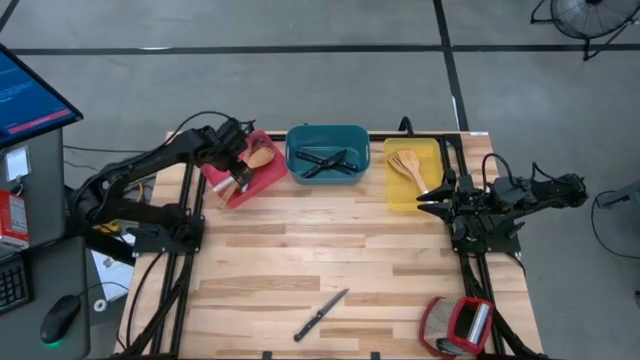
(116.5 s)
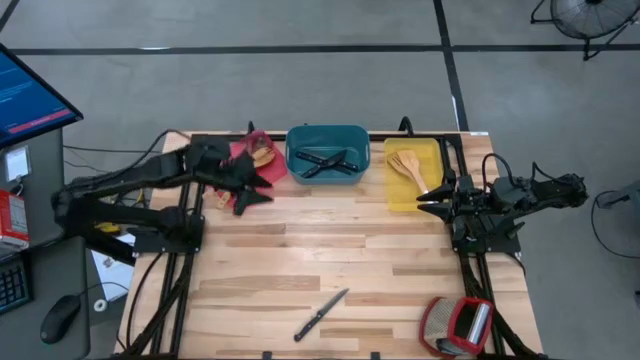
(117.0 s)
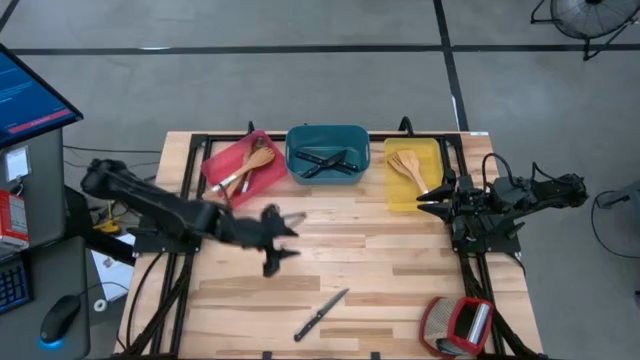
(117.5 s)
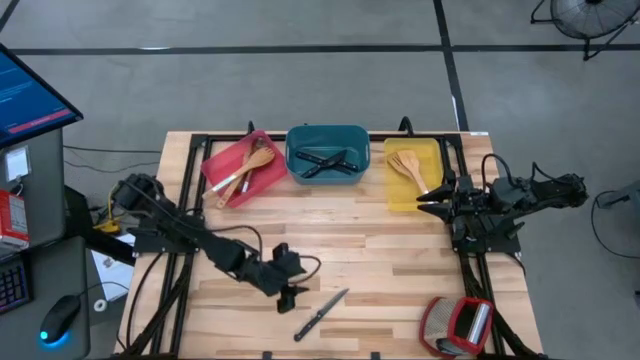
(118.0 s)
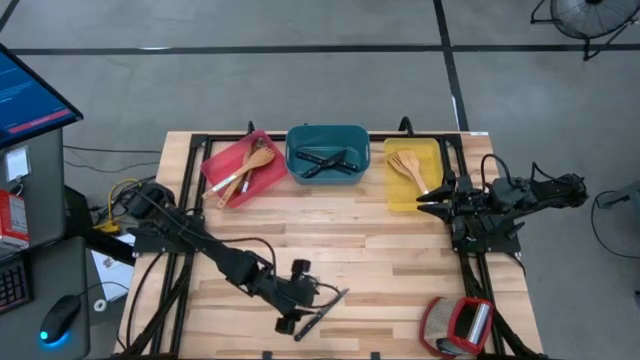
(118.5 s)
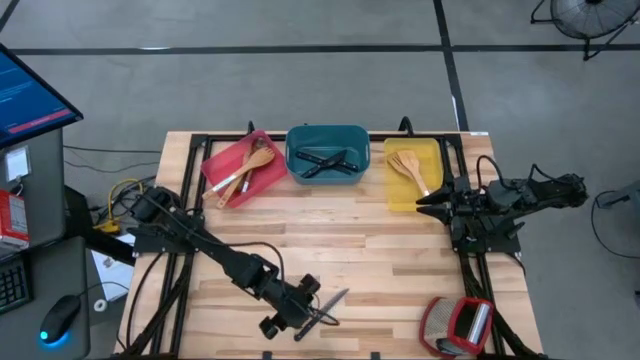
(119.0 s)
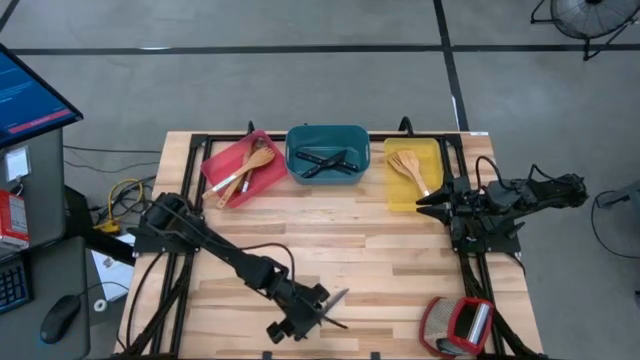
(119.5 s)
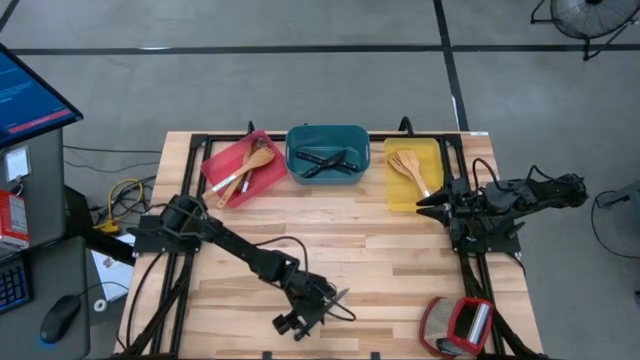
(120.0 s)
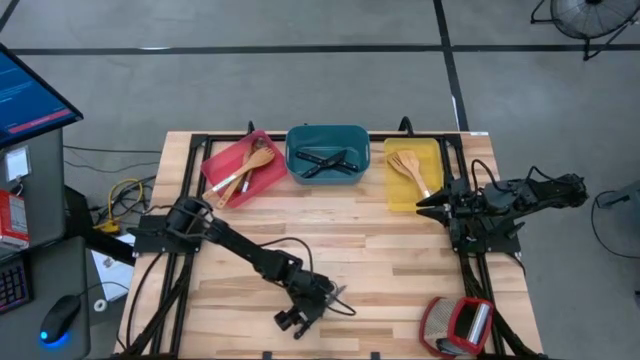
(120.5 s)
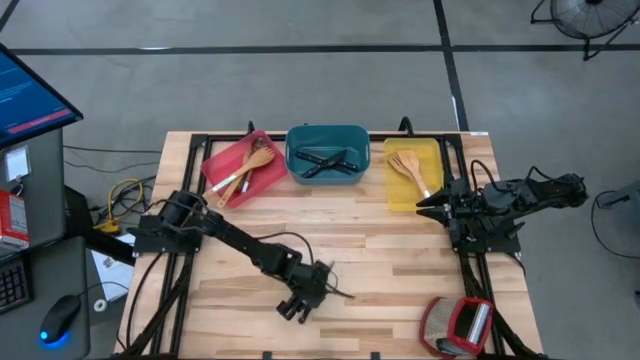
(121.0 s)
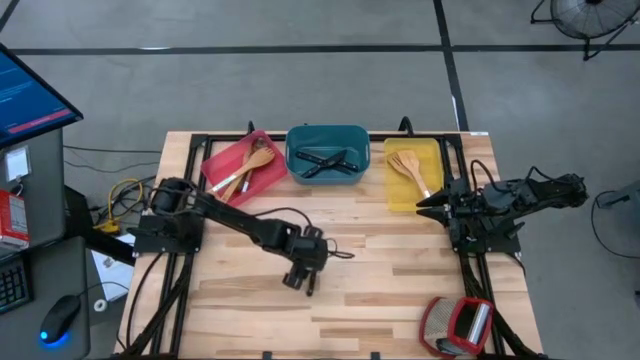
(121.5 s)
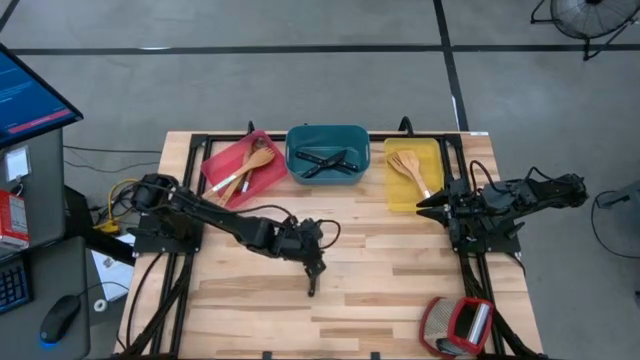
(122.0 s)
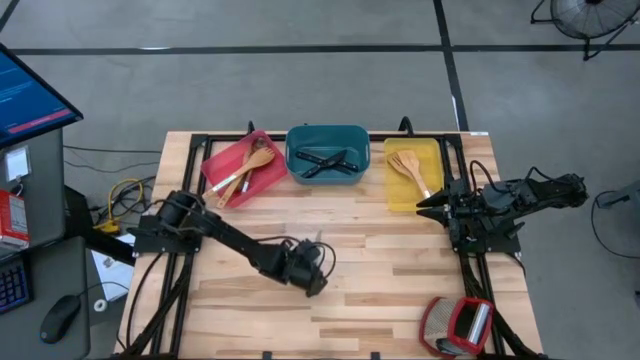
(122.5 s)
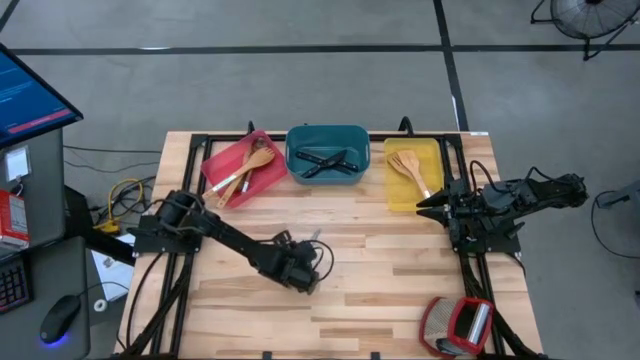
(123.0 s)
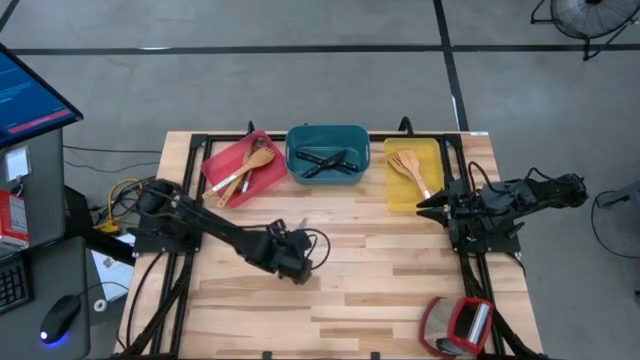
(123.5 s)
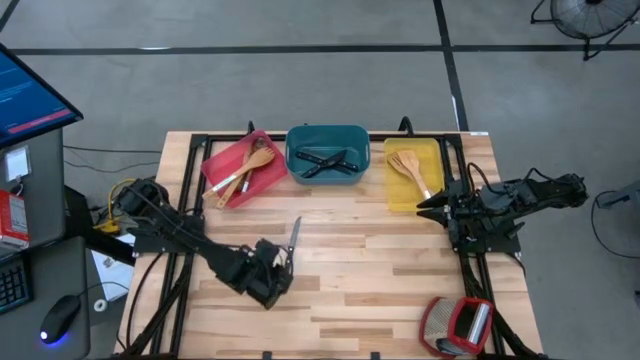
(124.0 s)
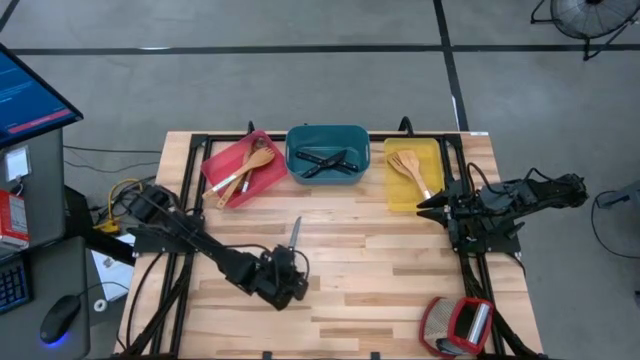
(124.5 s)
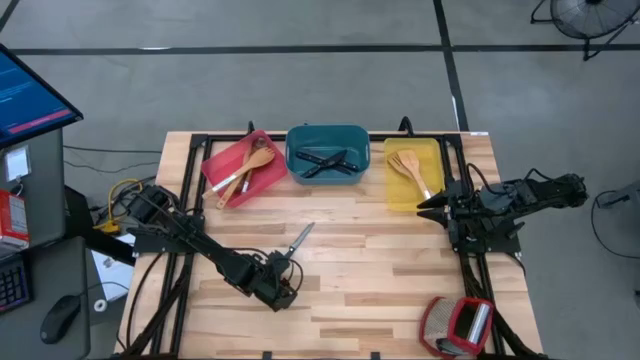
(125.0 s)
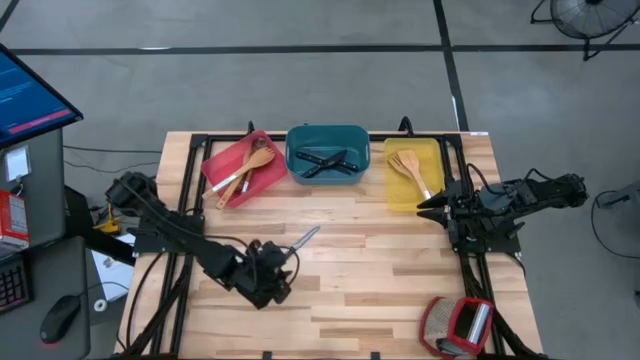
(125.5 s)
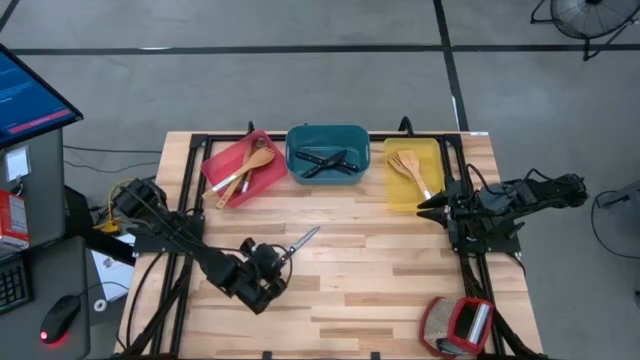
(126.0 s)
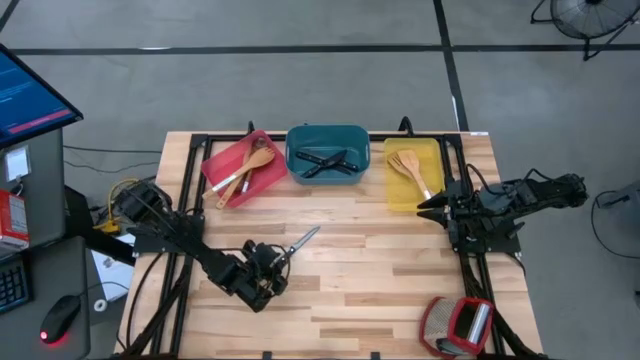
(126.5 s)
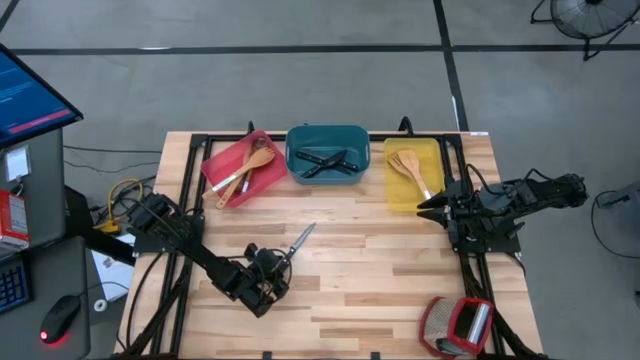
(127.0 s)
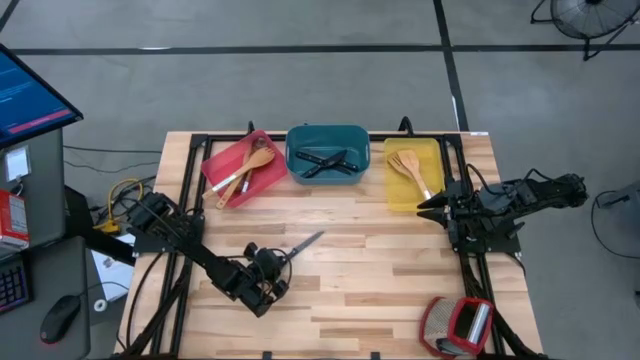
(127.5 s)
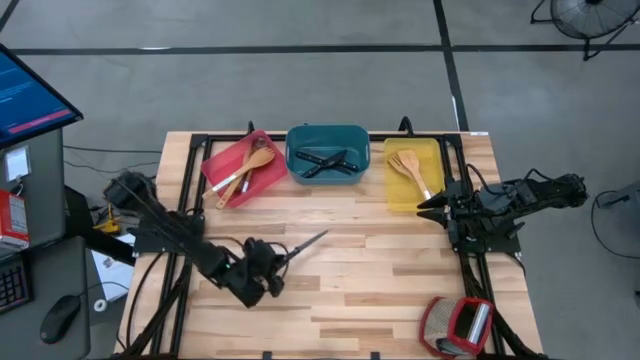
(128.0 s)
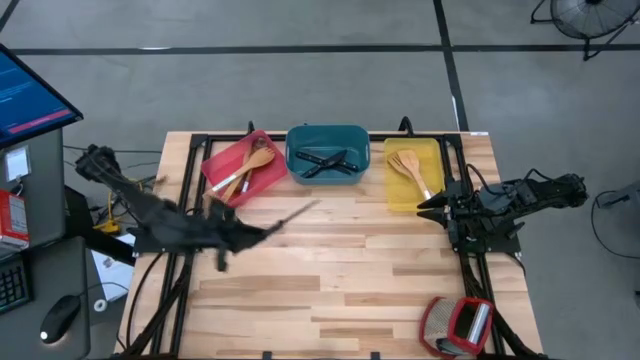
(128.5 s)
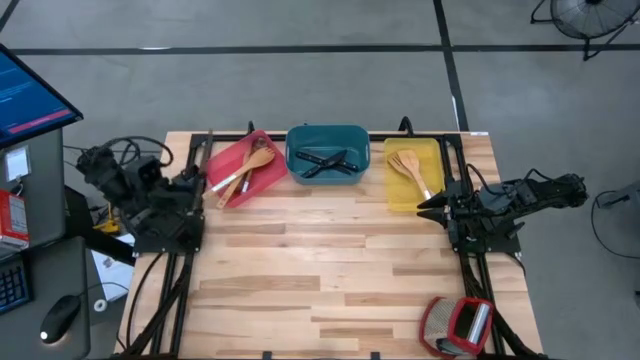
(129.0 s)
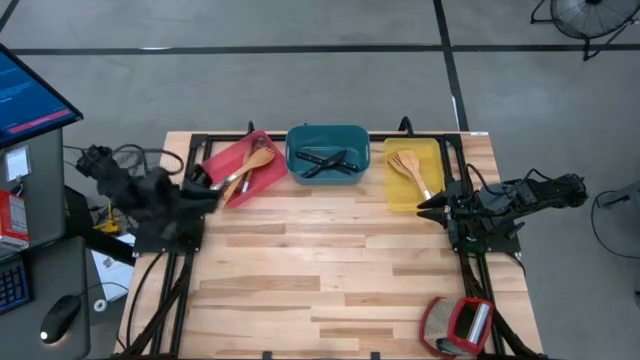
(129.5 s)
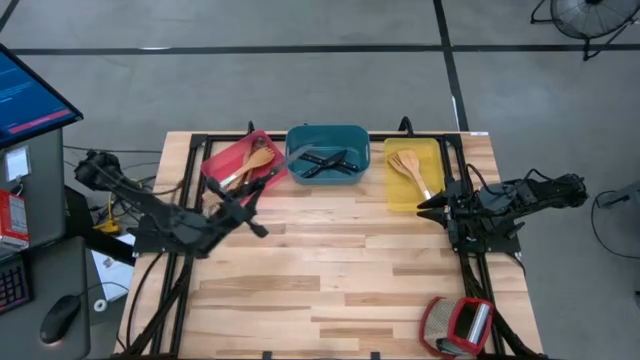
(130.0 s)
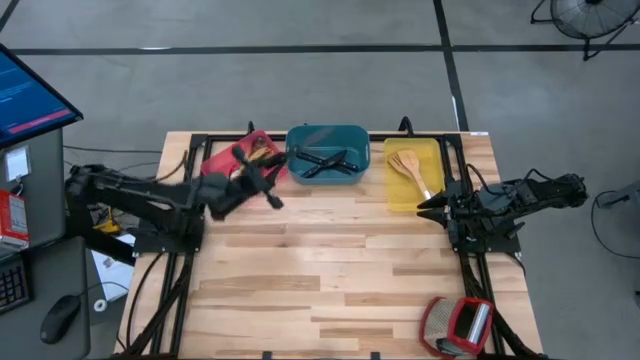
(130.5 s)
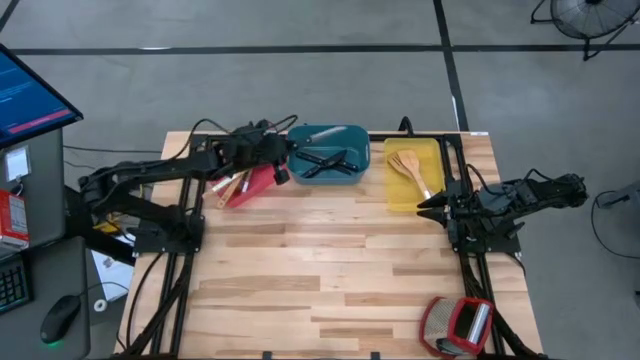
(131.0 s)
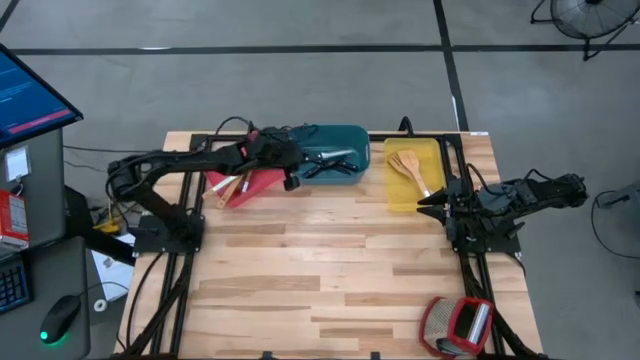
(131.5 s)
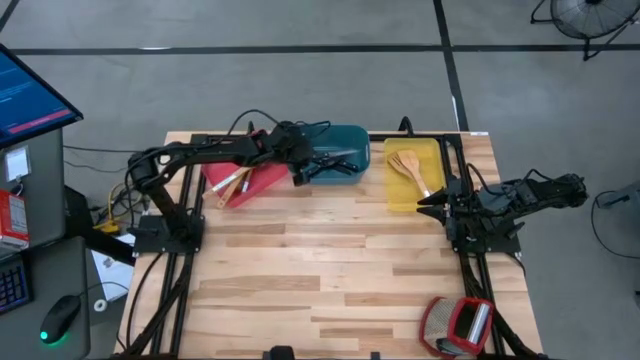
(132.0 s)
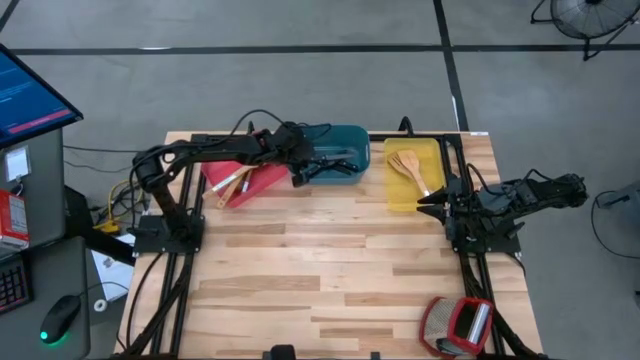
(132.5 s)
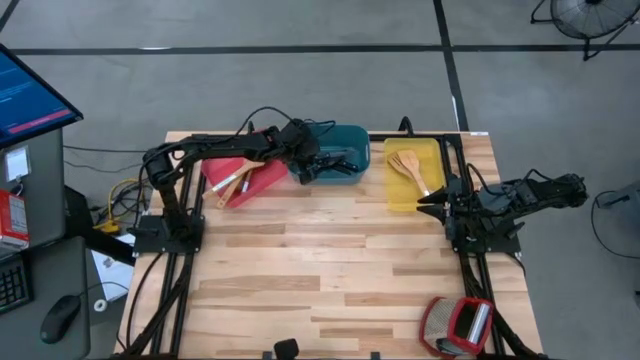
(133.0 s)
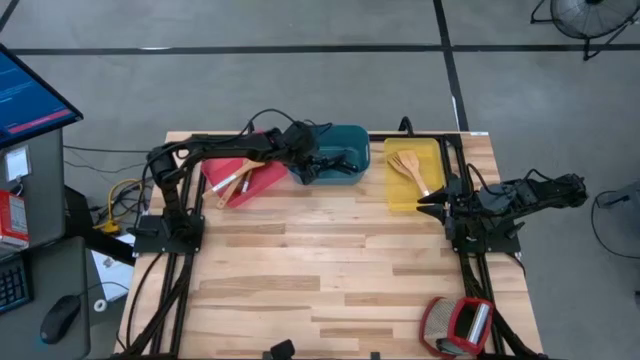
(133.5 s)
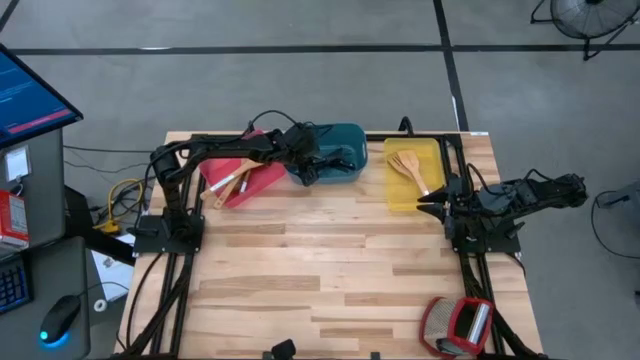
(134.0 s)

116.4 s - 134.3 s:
Task: Pick & Place Kitchen Items
Put the knife into the blue bin

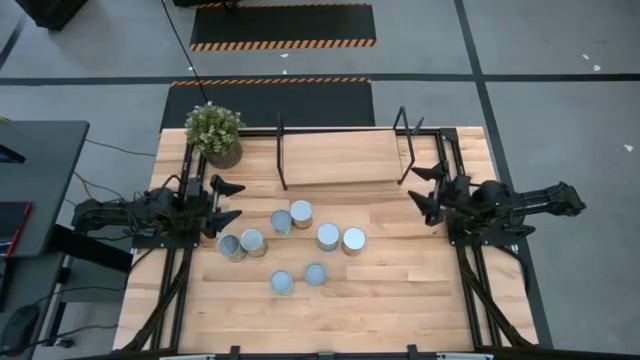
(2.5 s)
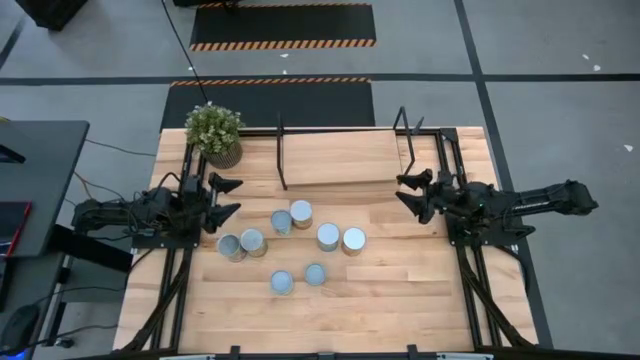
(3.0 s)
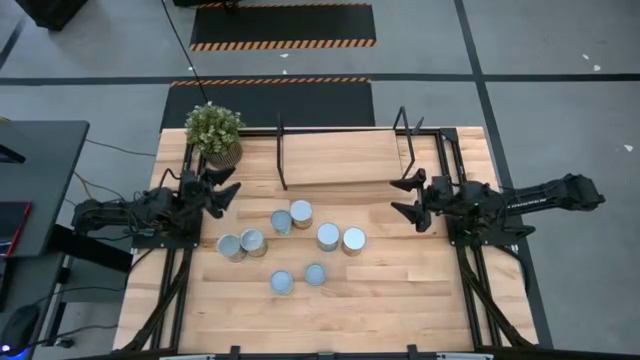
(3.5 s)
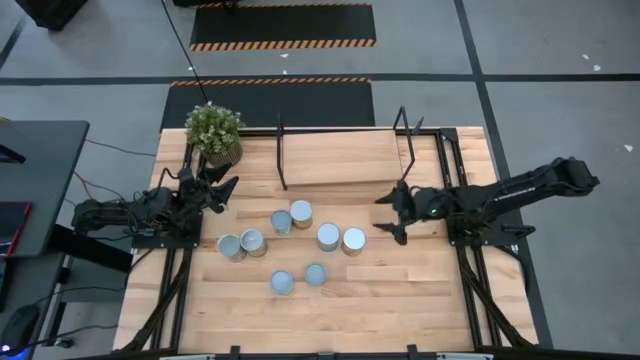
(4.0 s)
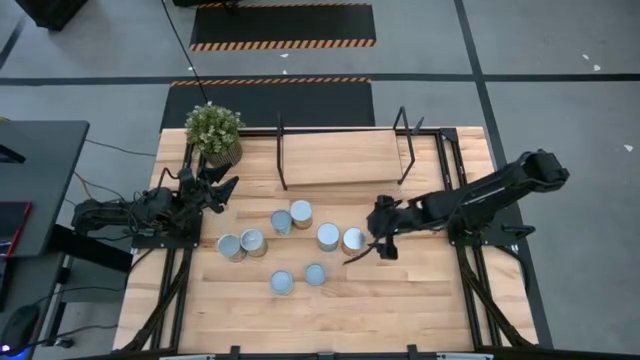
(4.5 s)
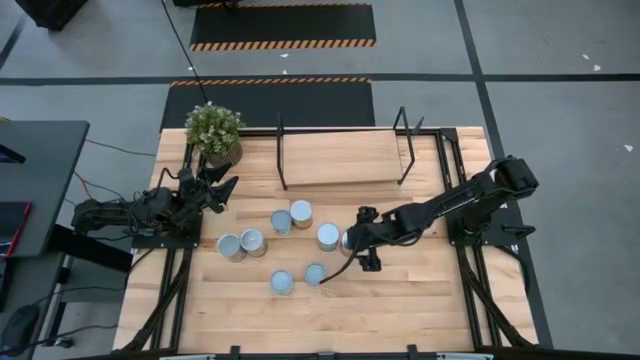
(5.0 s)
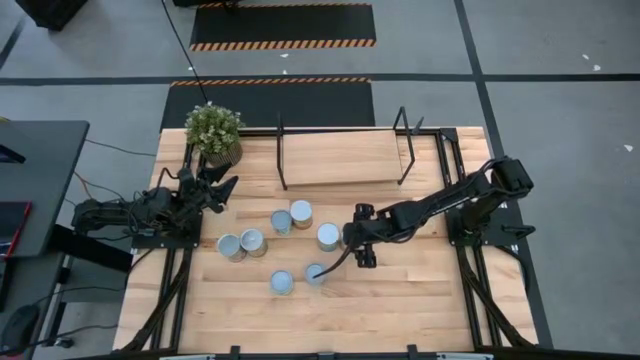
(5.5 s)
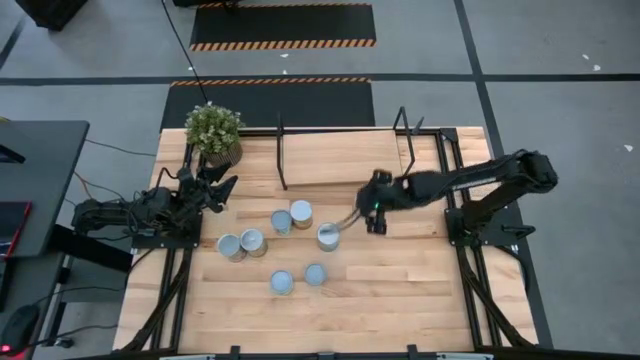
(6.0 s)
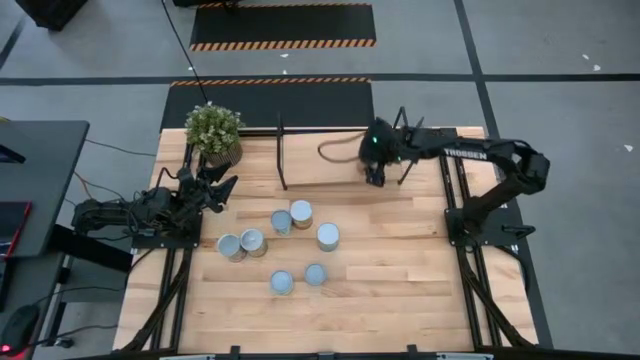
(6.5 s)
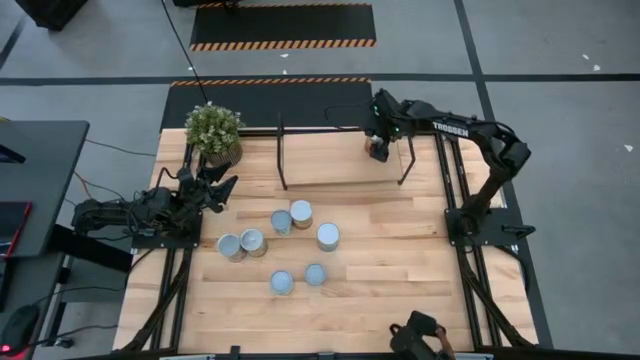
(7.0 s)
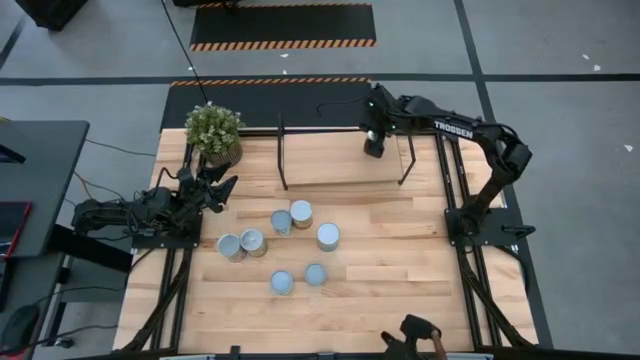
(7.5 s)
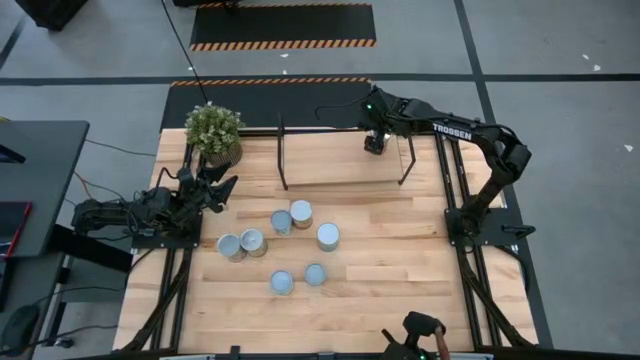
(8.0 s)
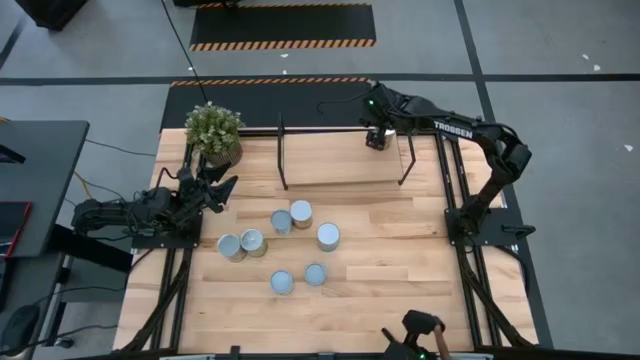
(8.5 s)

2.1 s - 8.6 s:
Task: Pick and place cans onto a shelf
Put the canned pineapple on the shelf
